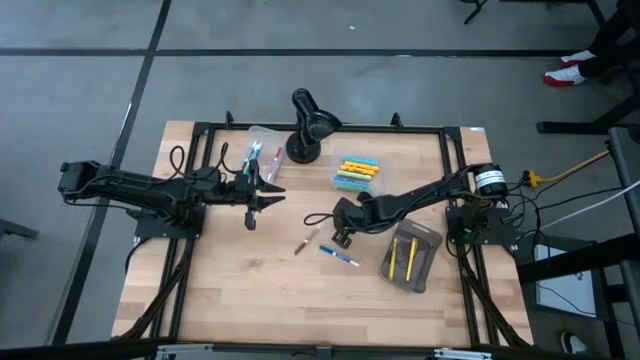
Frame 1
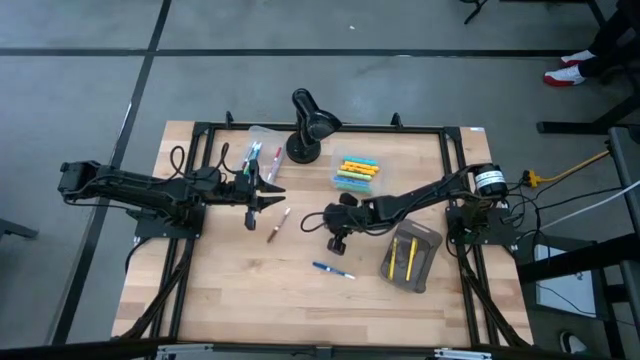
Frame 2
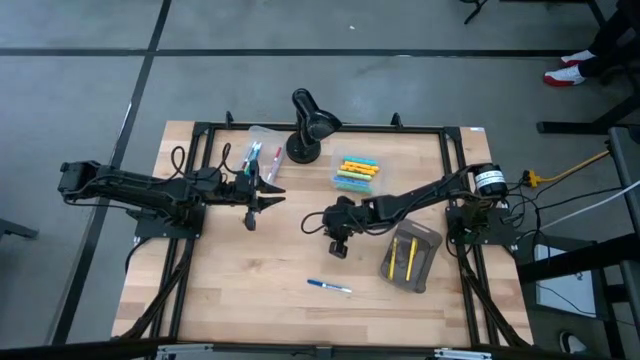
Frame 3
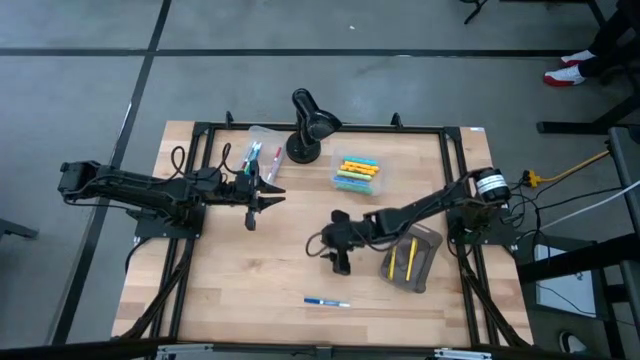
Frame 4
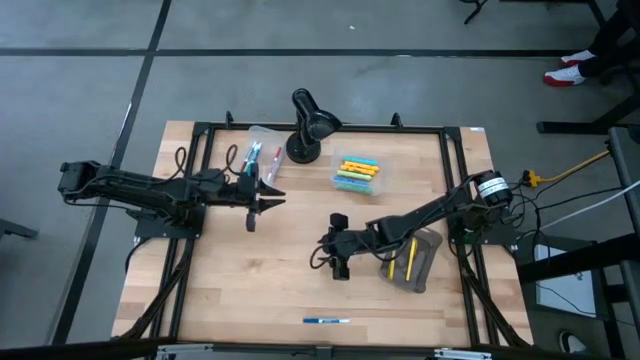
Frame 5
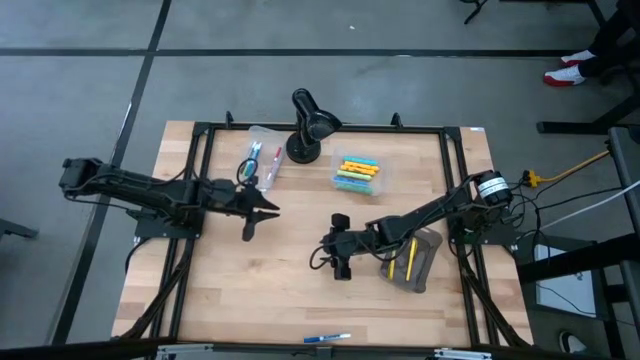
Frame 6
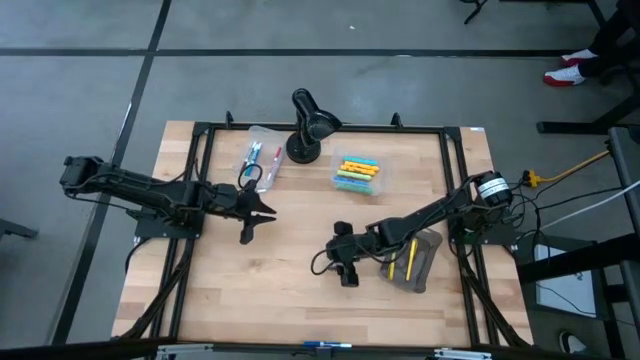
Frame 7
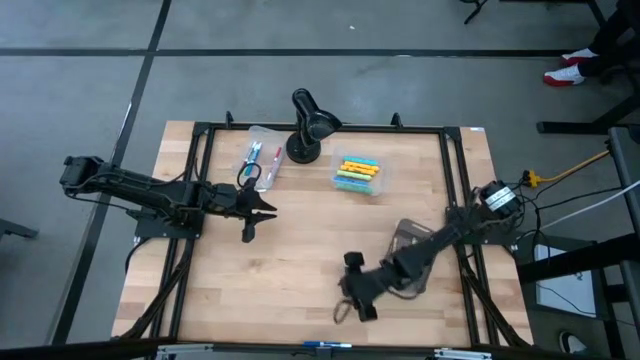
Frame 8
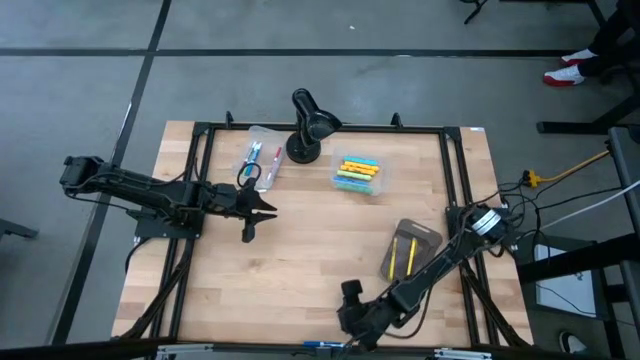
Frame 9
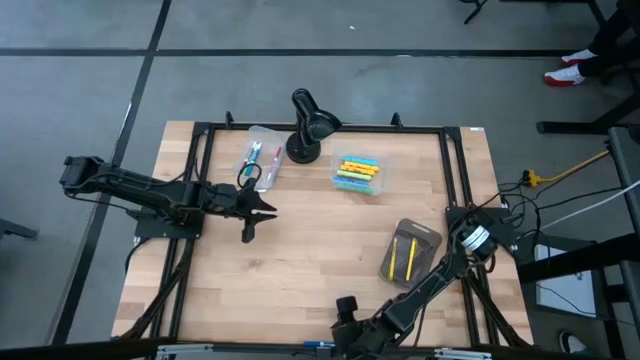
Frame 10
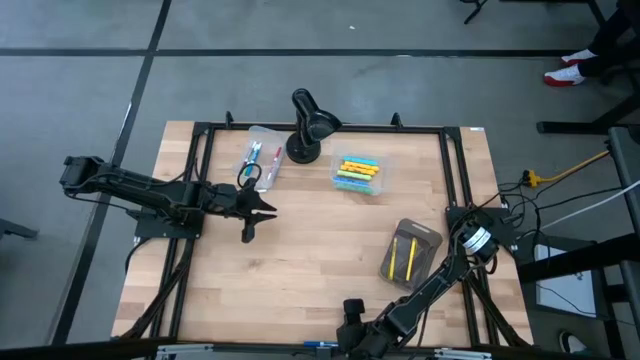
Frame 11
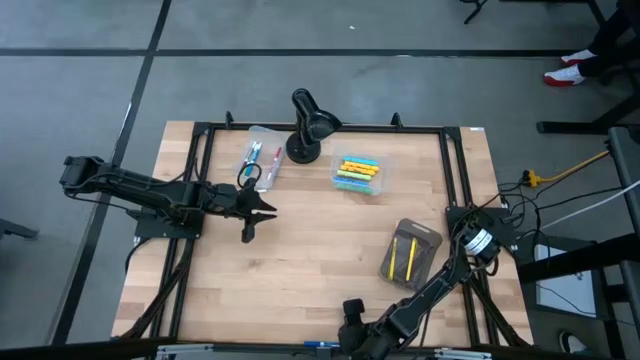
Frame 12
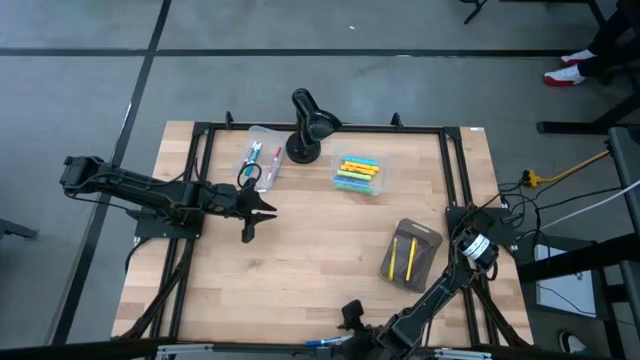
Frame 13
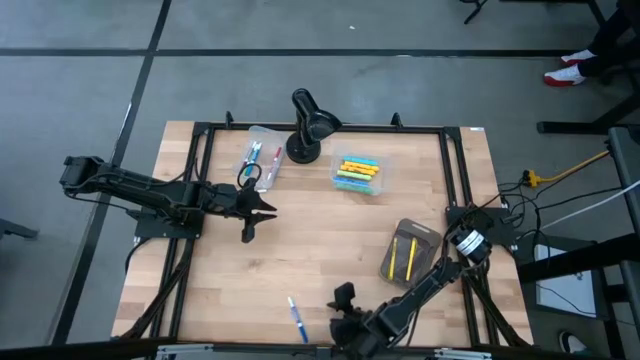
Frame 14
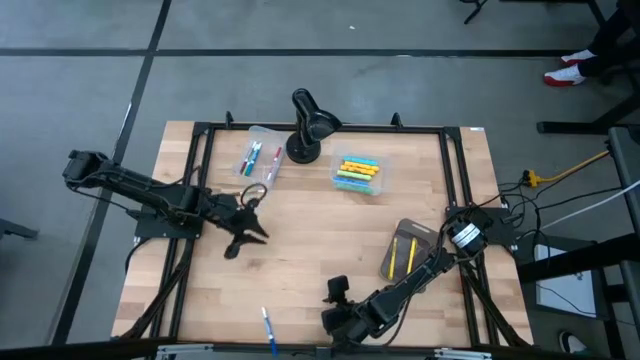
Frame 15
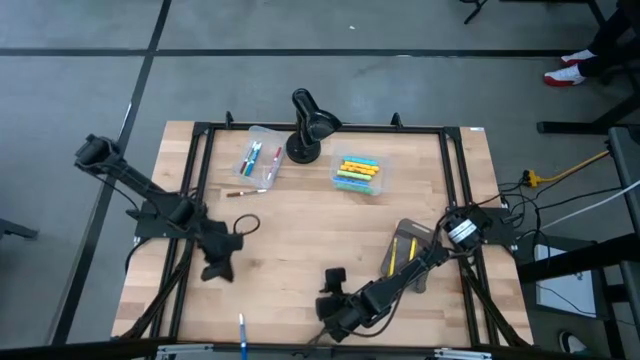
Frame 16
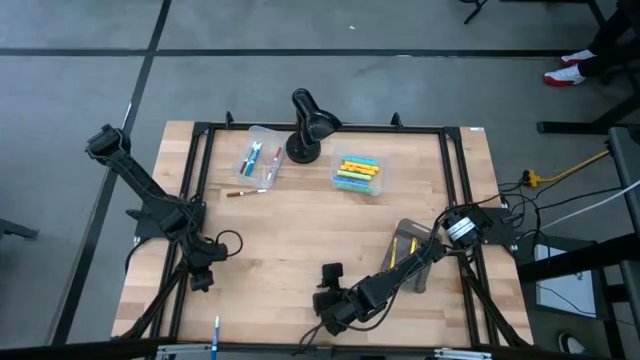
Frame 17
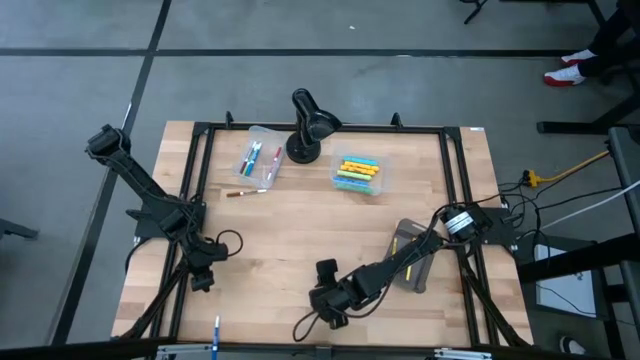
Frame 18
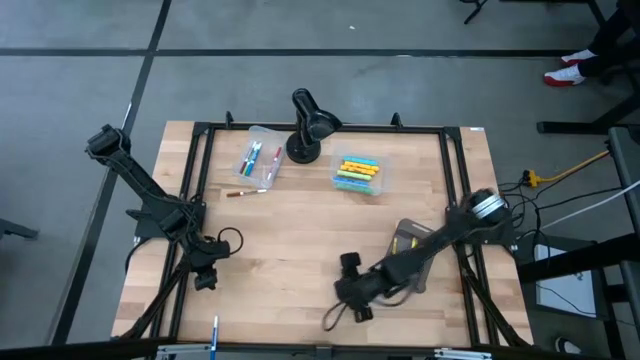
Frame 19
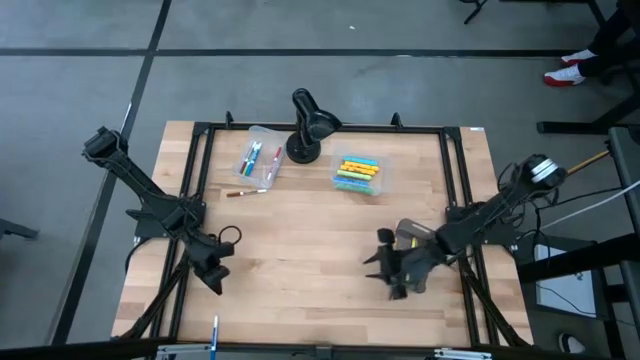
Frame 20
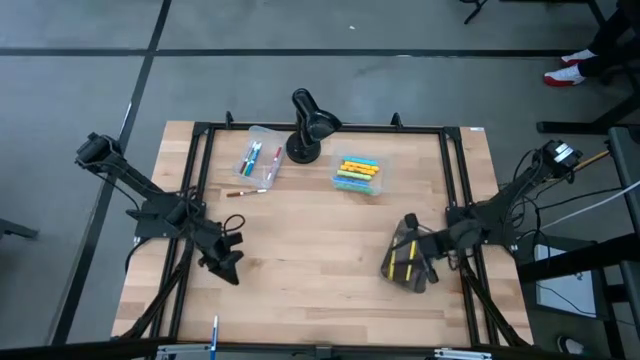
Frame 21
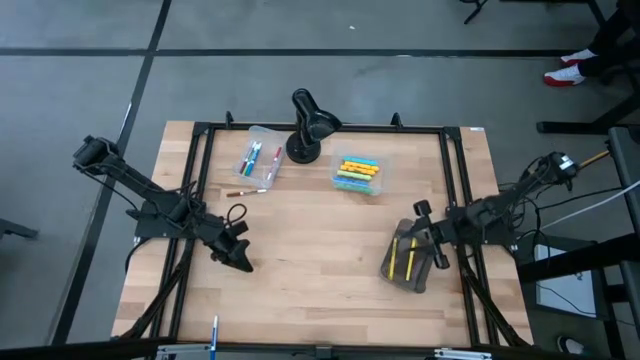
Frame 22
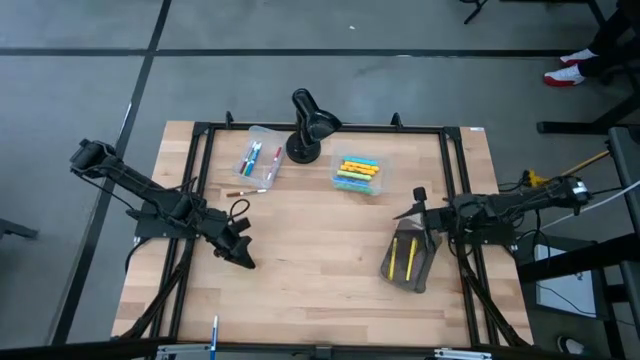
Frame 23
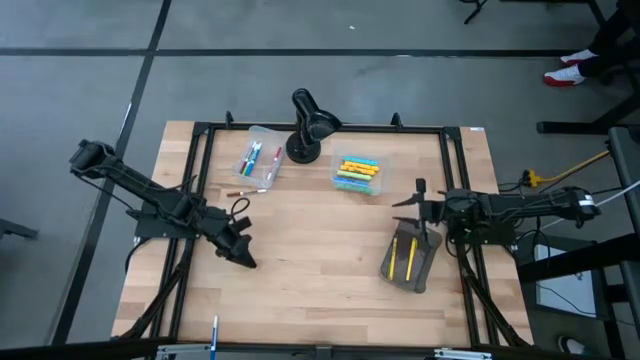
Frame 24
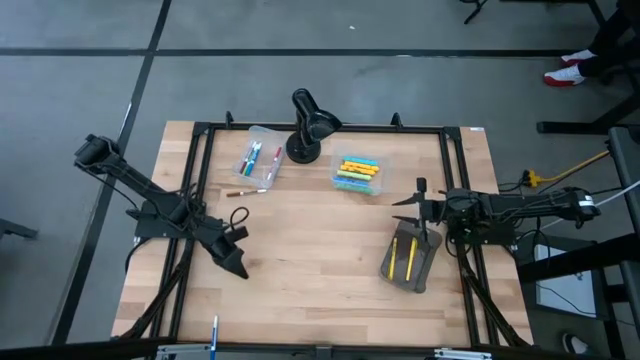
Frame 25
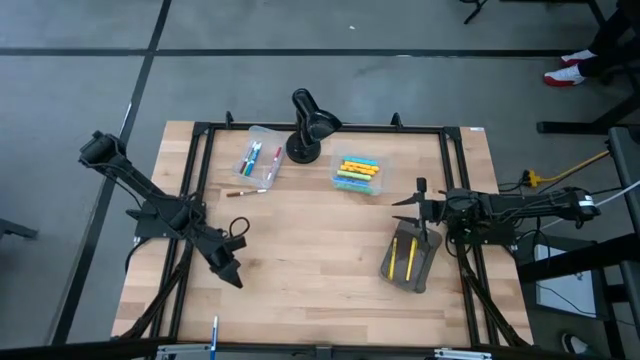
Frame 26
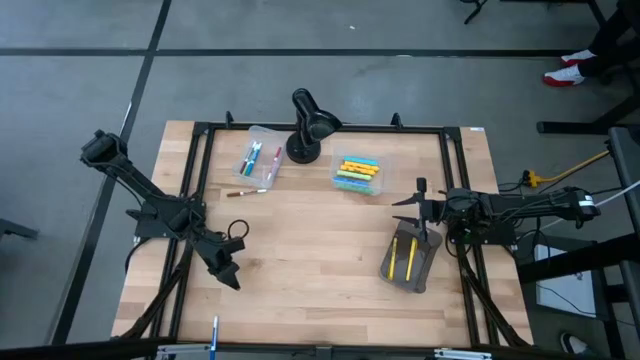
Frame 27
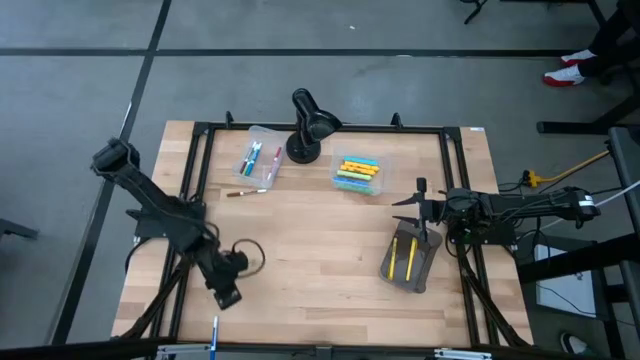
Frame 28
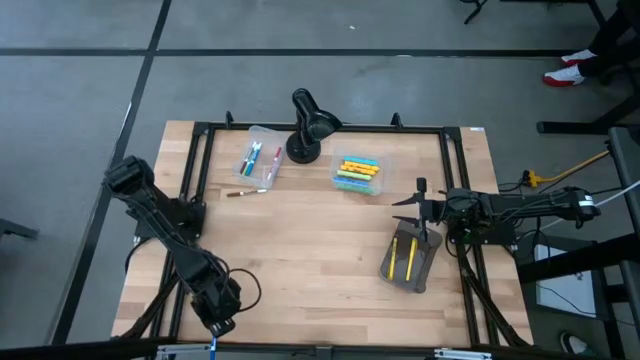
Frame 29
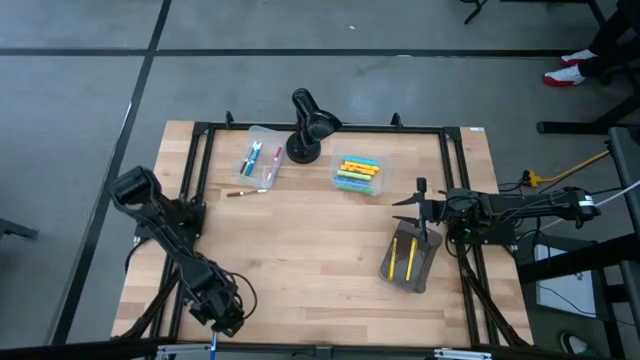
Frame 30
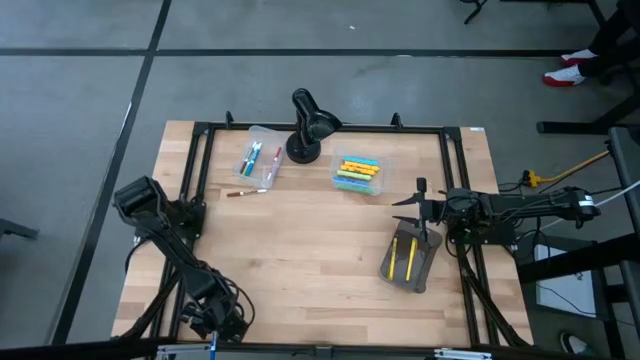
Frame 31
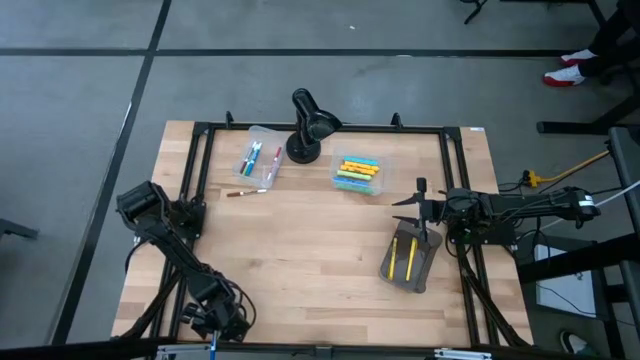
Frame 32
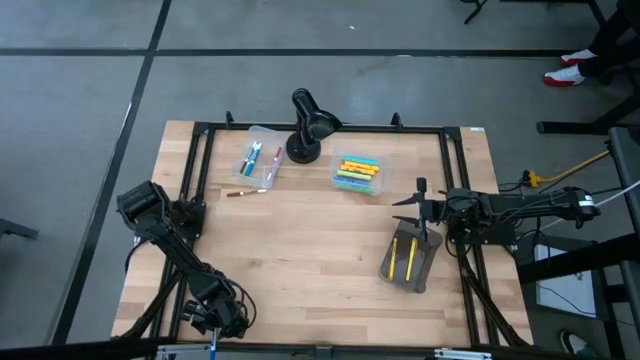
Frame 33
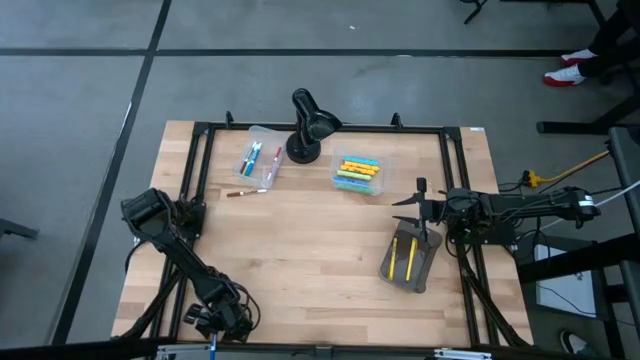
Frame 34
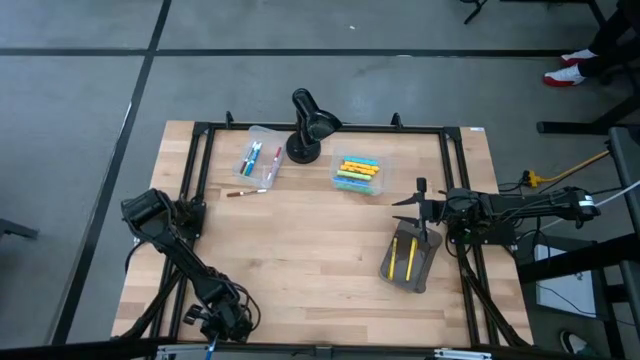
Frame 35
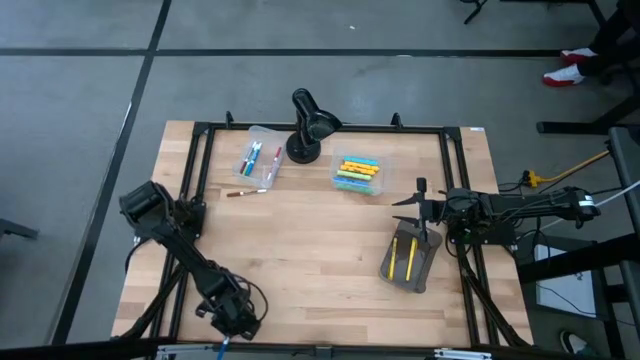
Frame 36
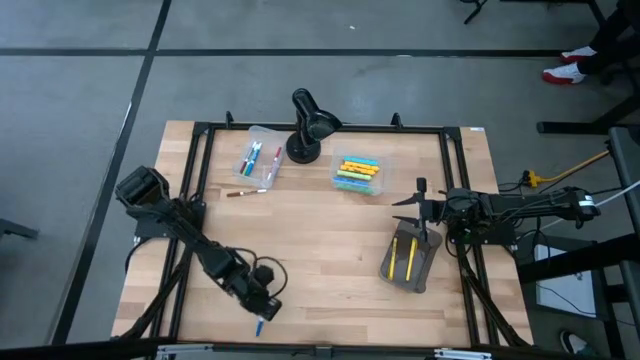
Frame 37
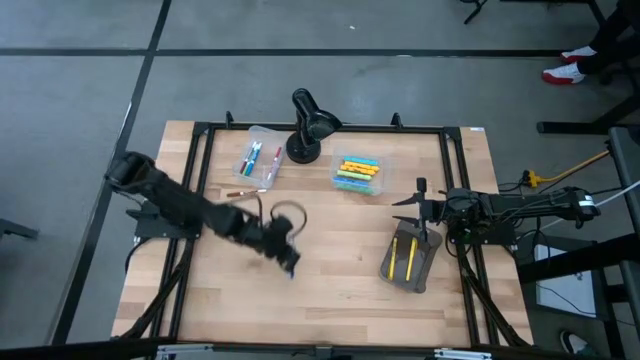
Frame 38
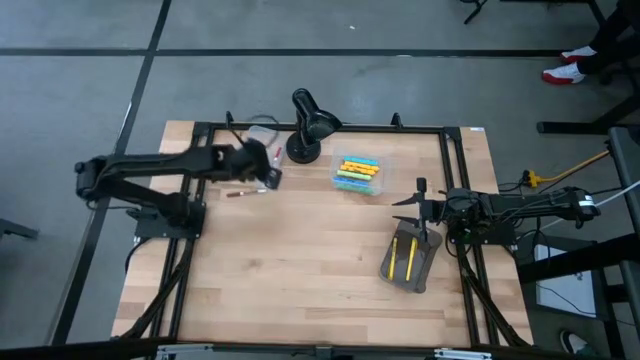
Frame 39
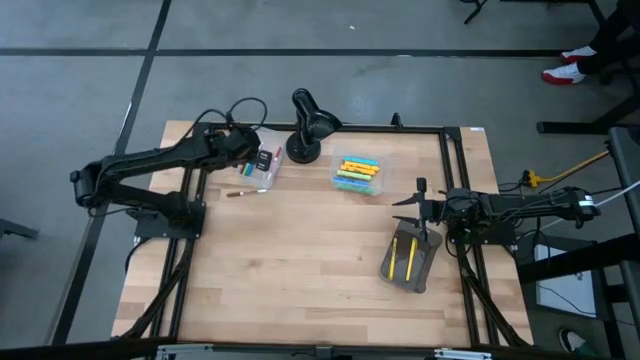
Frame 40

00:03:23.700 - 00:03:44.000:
Task: Pick & Place Markers
Put the blue marker pen into the left transparent bin

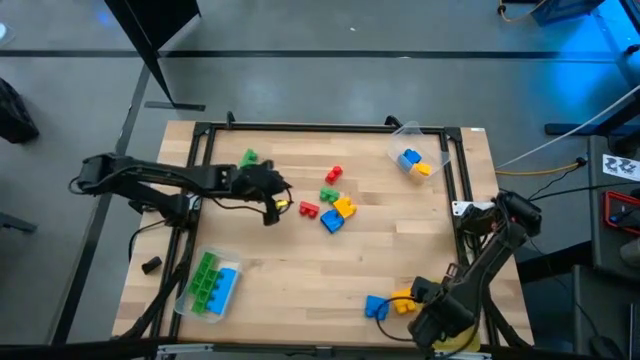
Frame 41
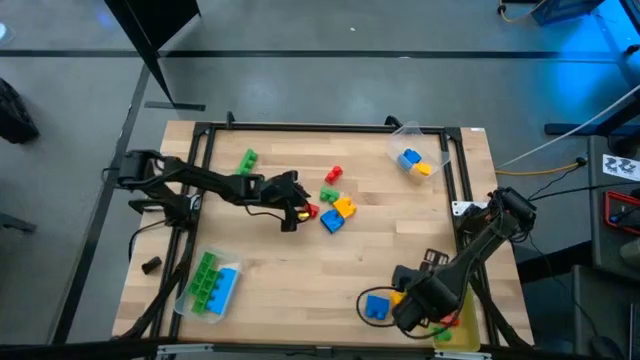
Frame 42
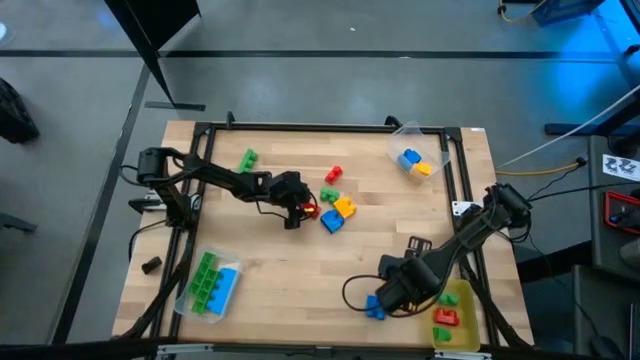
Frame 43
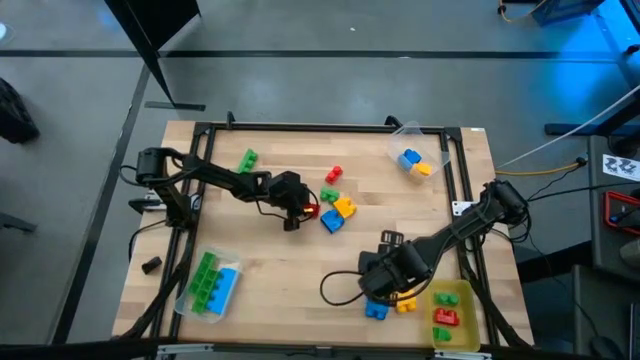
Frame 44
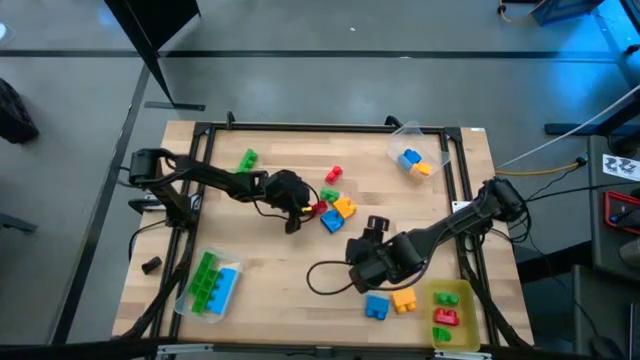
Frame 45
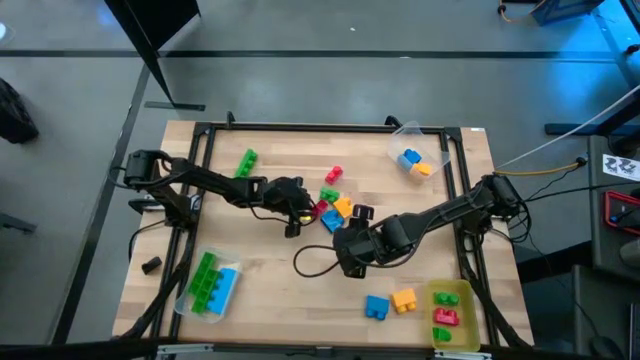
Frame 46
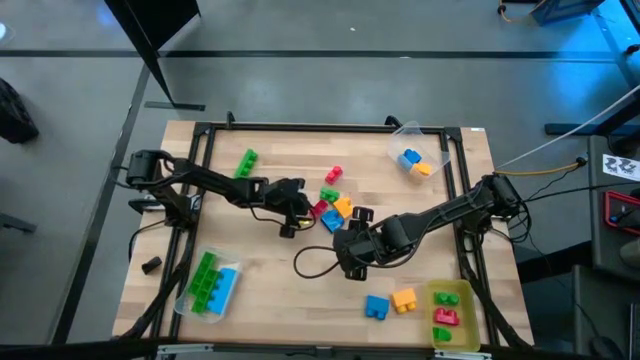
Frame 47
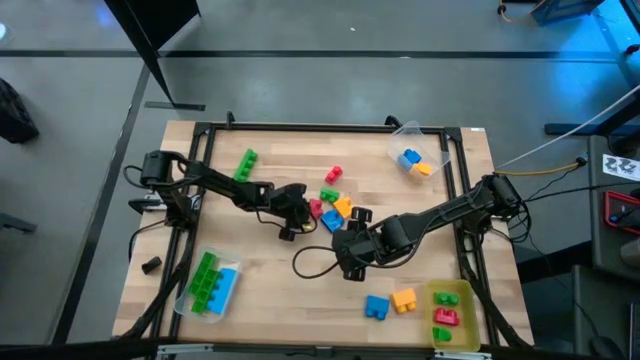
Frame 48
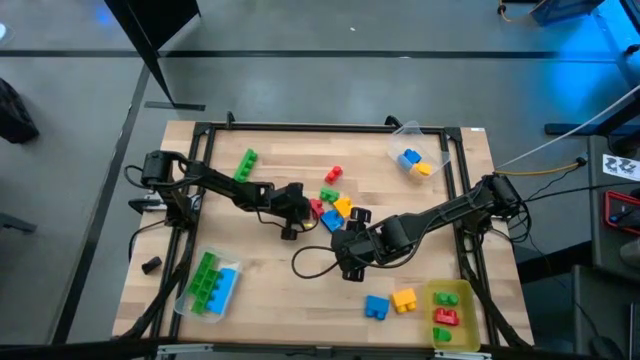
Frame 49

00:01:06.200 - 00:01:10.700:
Task: Sort blocks by size
Put the bottom 2 stud red game piece into the yellow bin
